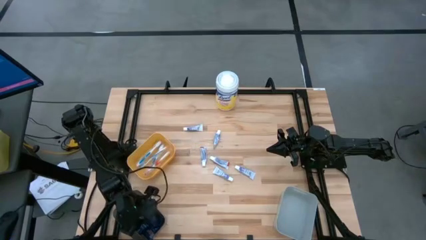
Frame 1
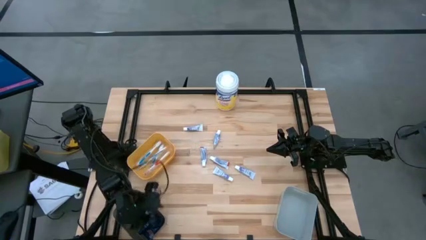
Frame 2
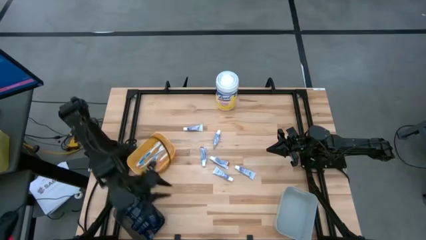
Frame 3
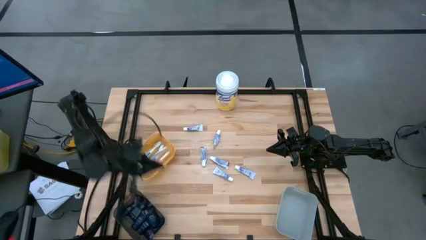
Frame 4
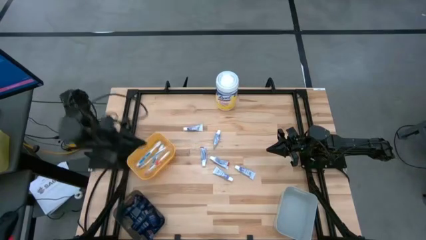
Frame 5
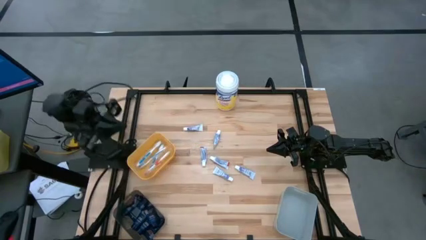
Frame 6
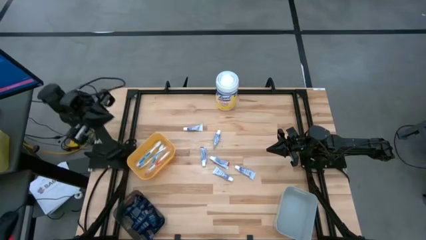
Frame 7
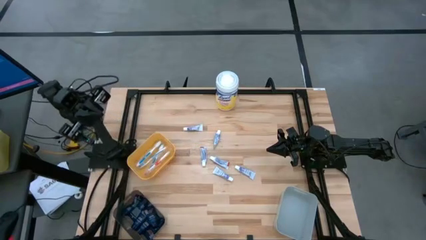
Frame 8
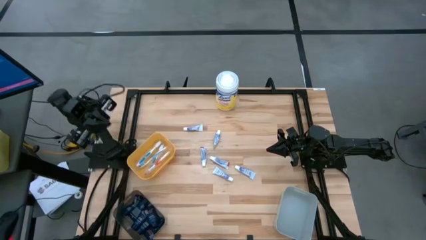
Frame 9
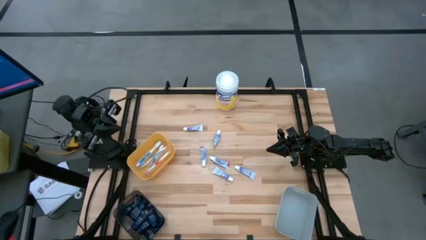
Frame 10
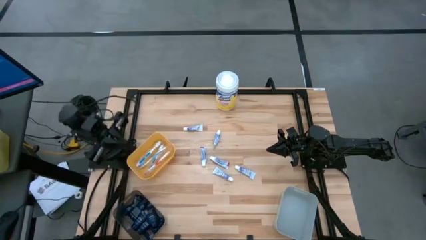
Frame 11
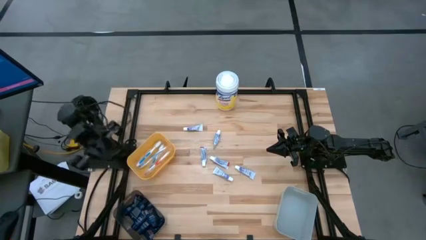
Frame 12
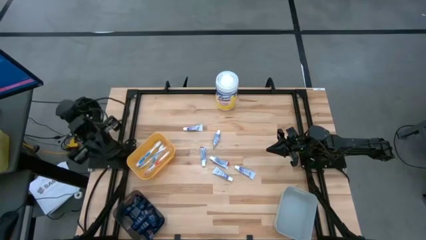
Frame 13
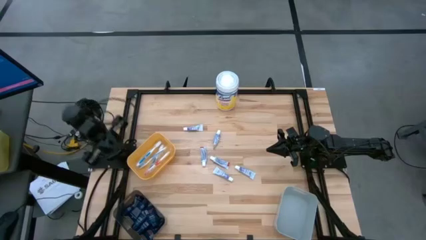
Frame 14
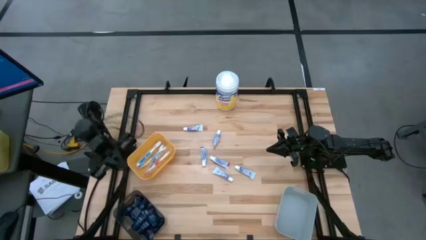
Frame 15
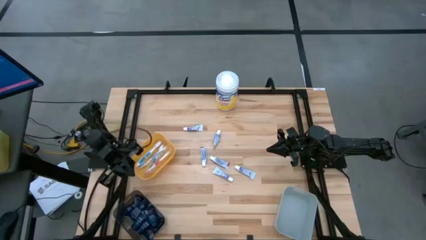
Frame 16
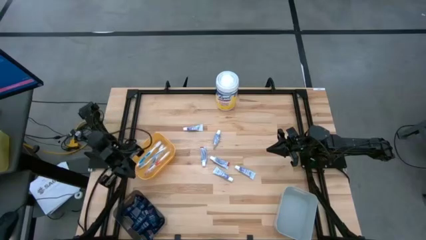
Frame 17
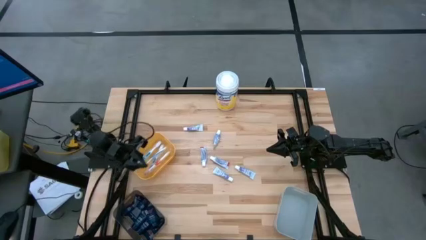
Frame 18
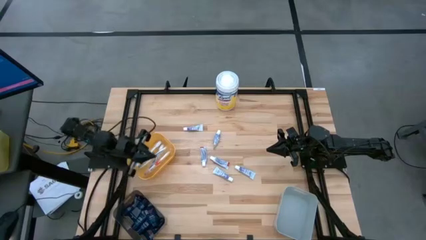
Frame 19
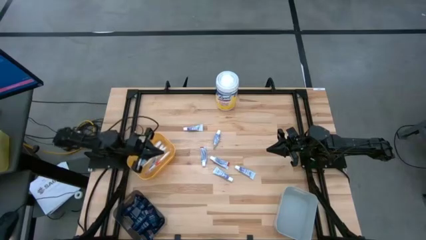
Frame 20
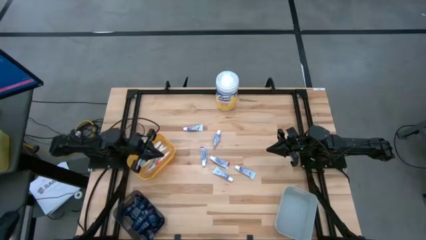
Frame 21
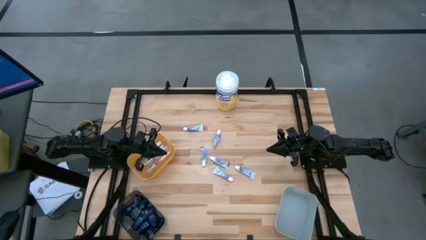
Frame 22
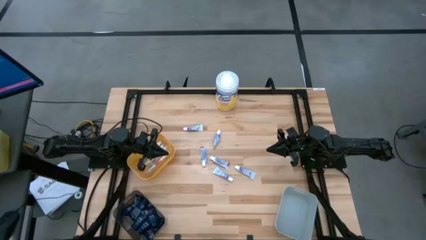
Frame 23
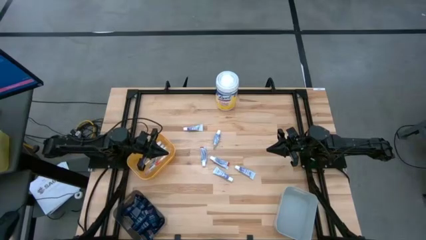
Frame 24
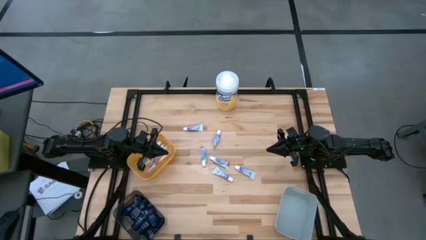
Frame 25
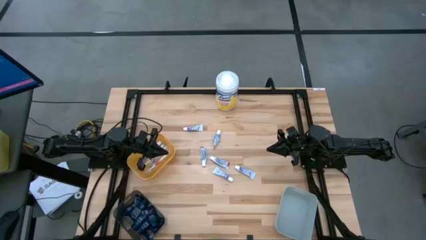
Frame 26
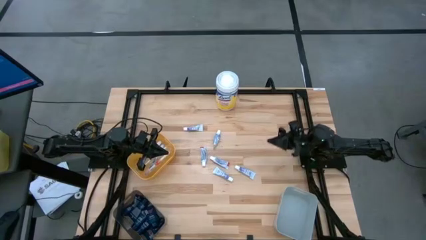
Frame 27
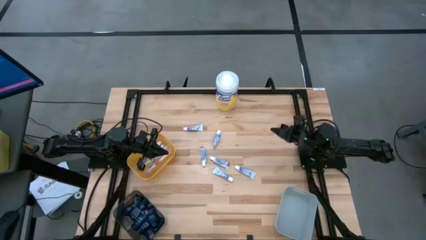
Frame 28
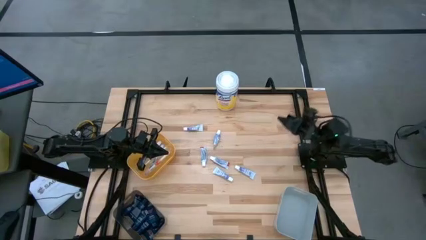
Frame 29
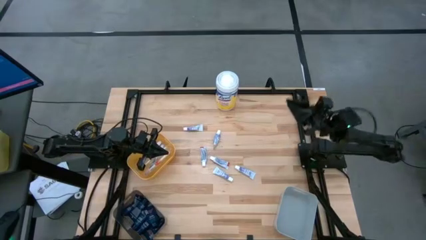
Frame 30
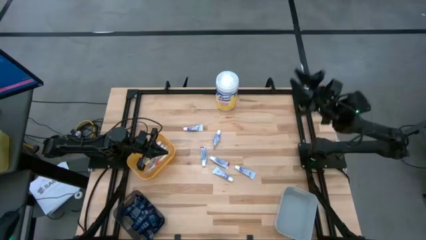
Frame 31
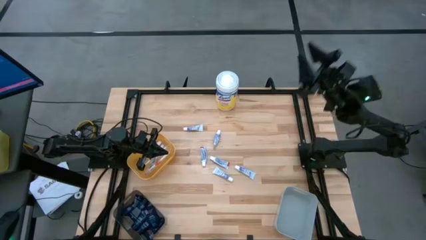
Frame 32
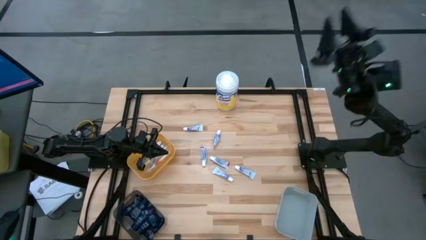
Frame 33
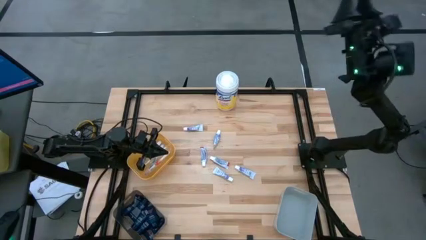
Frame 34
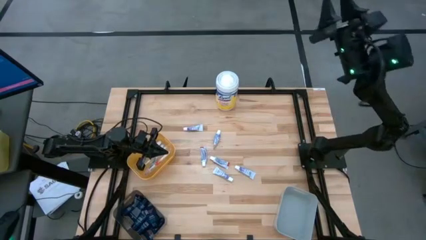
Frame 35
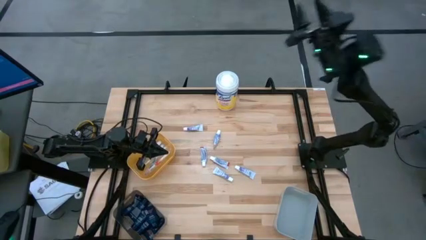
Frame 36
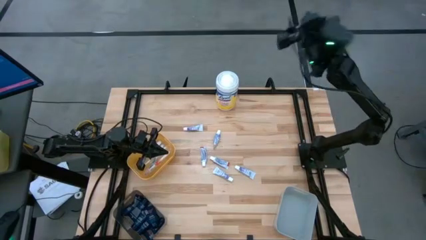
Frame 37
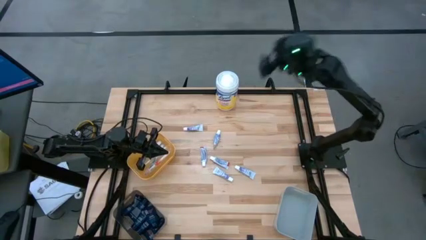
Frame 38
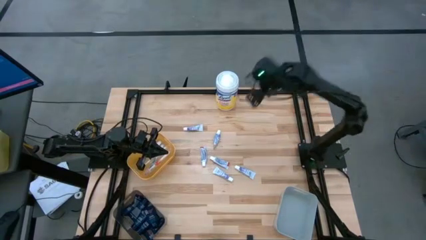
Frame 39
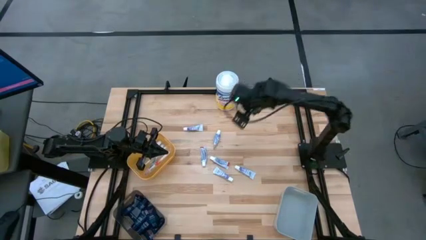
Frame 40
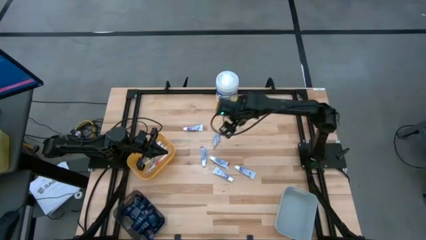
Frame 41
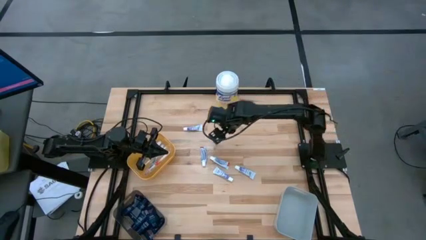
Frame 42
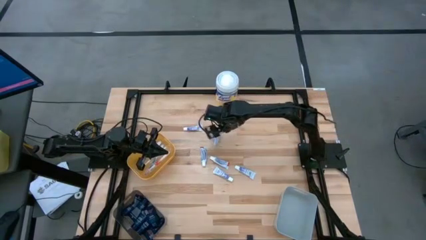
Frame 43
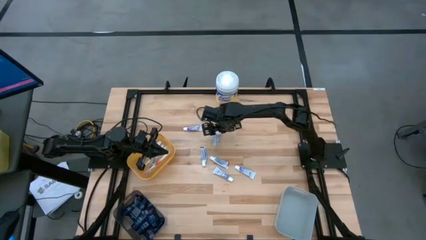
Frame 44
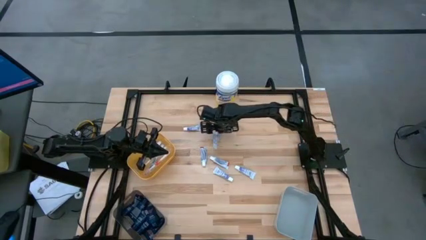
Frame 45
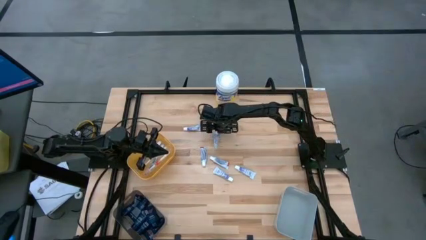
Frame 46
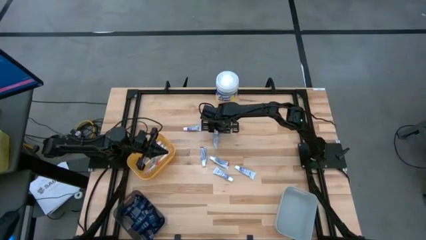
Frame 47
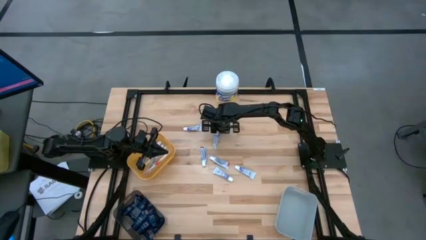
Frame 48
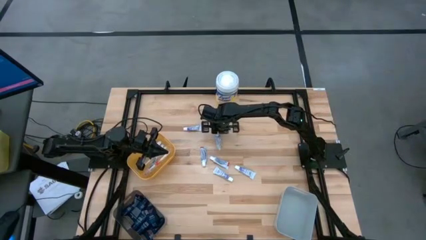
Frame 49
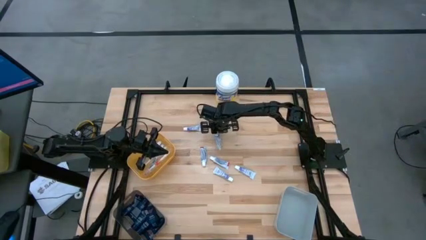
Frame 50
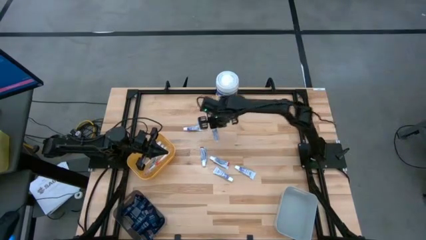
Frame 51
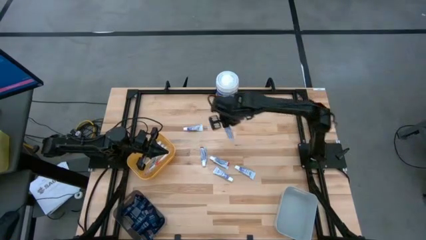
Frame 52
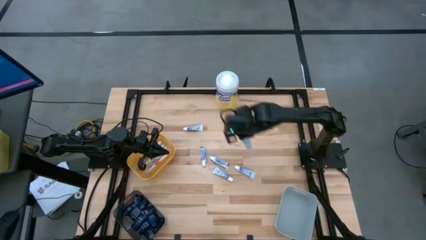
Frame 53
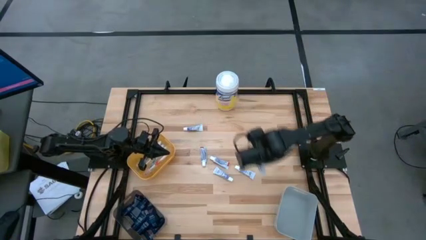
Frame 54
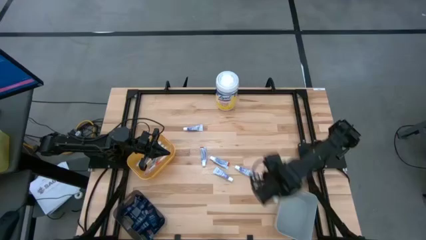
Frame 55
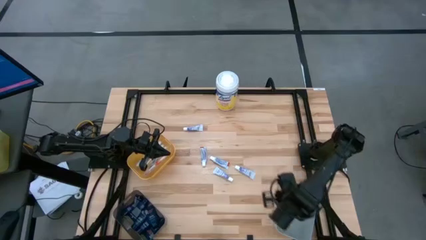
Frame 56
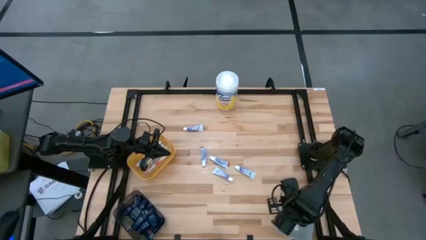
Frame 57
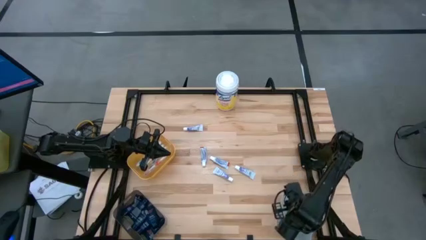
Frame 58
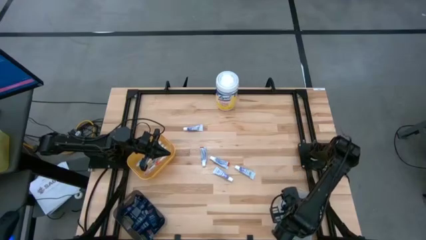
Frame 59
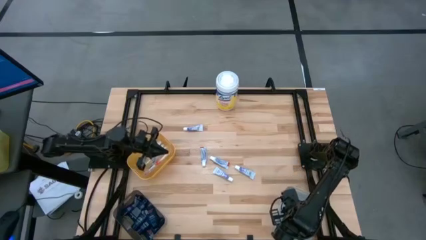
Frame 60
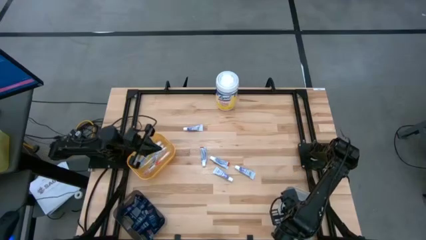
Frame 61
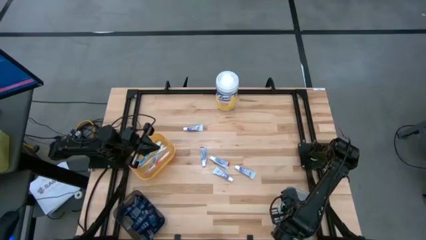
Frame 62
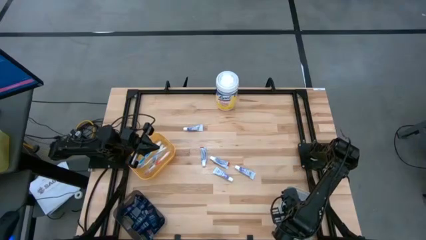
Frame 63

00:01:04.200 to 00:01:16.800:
Task: Pick & Place Travel size toiletries
Put the white toothpaste into the white bin

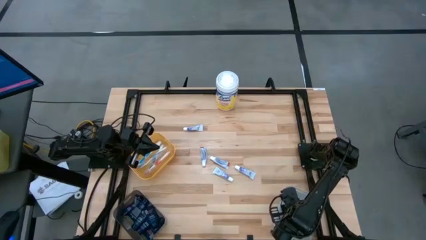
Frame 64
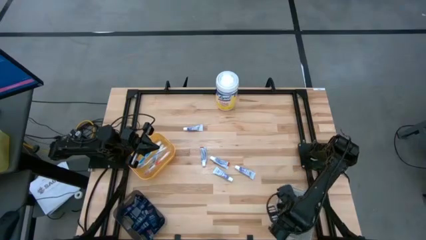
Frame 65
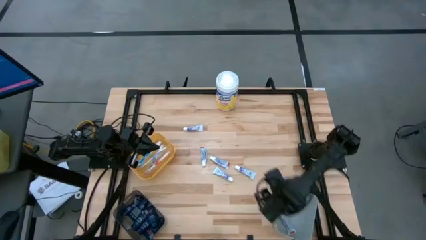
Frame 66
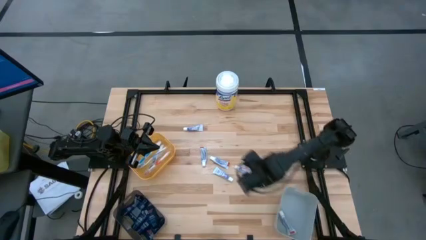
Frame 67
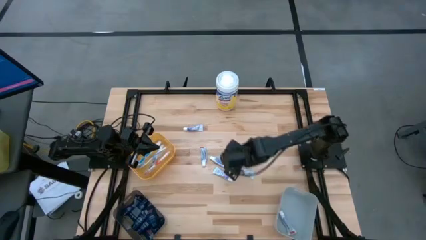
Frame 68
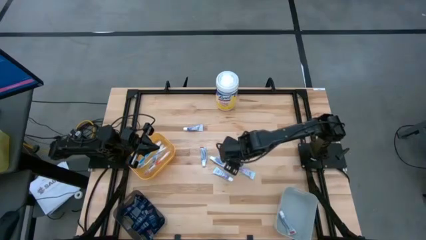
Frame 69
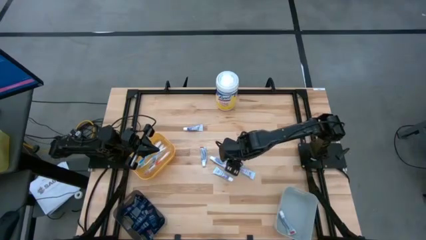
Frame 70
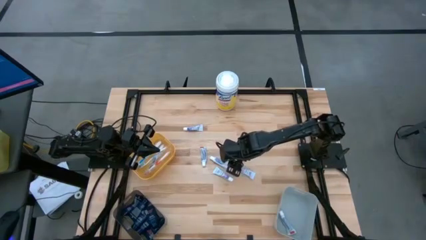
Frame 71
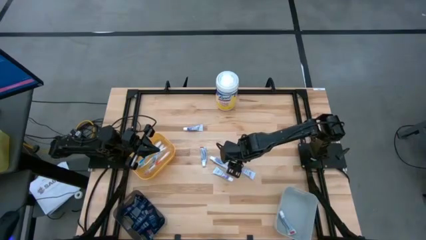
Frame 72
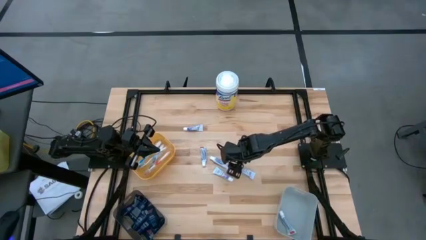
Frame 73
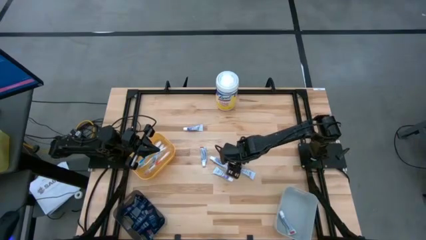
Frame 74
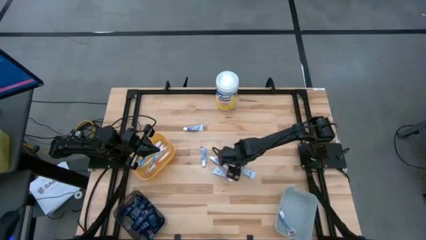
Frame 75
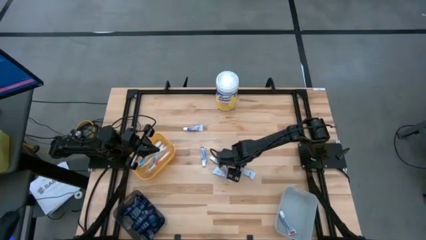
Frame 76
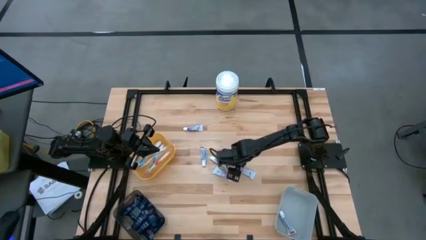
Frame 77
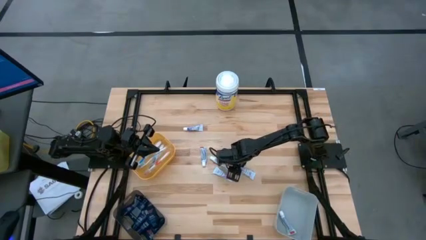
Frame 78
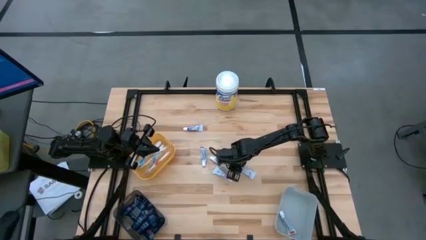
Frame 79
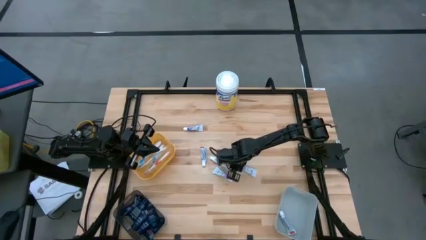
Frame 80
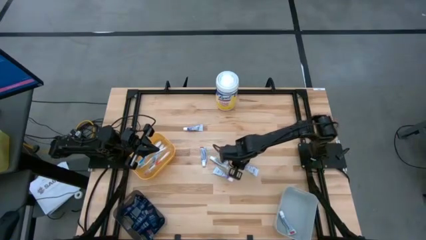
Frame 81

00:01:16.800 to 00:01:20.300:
Put the white toothpaste into the white bin
